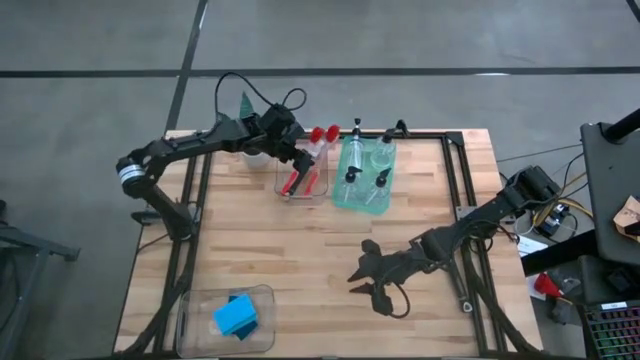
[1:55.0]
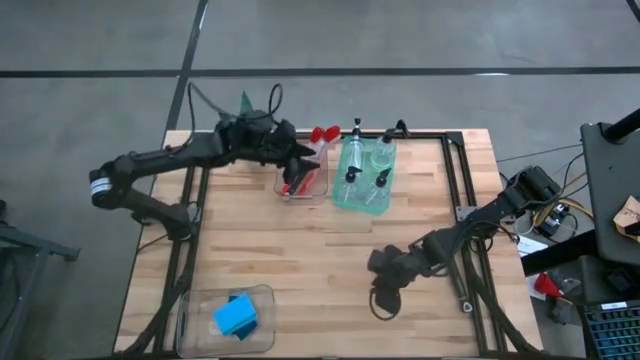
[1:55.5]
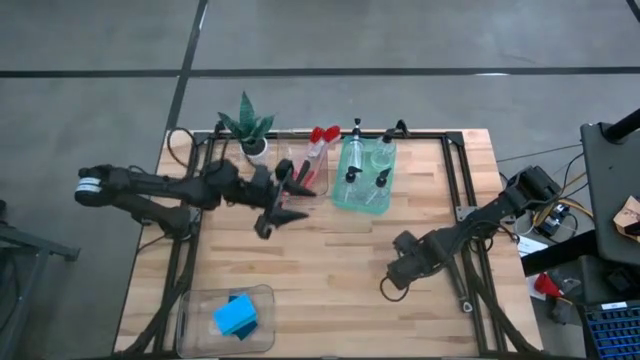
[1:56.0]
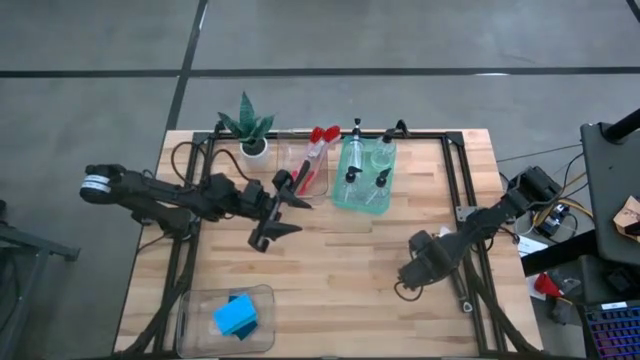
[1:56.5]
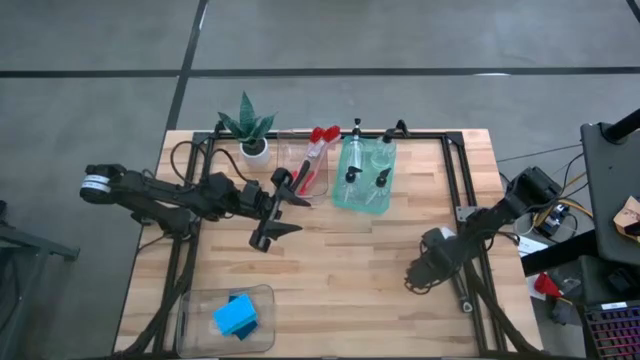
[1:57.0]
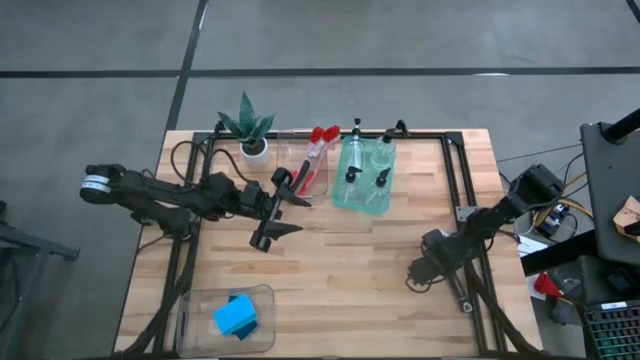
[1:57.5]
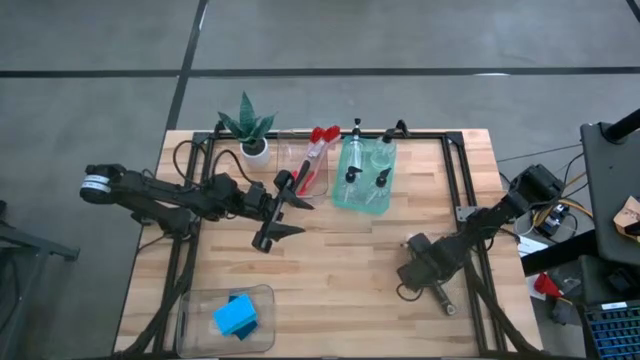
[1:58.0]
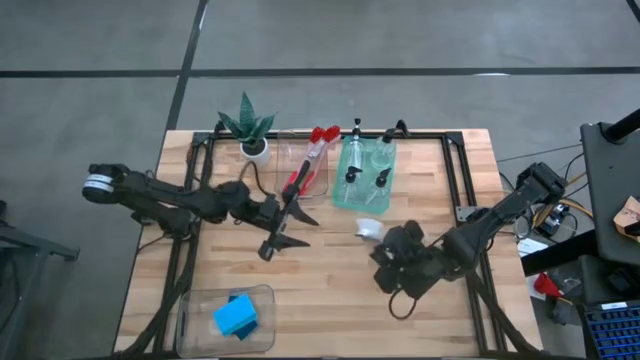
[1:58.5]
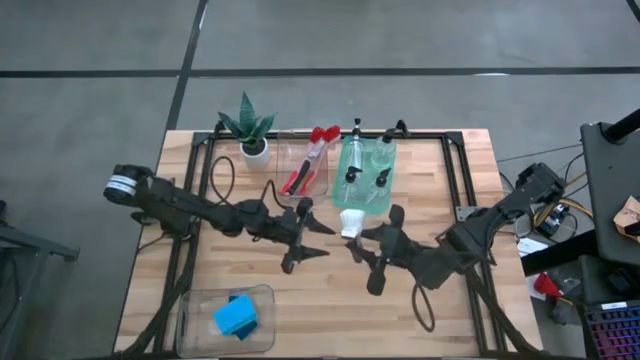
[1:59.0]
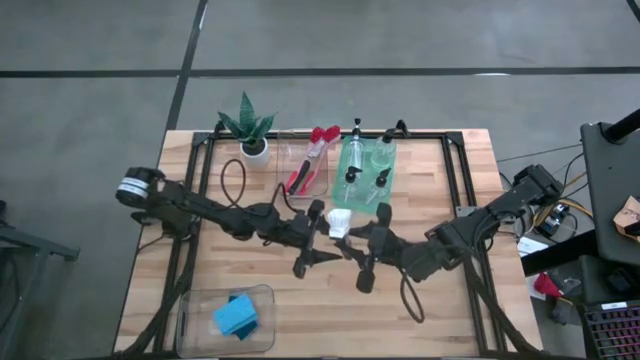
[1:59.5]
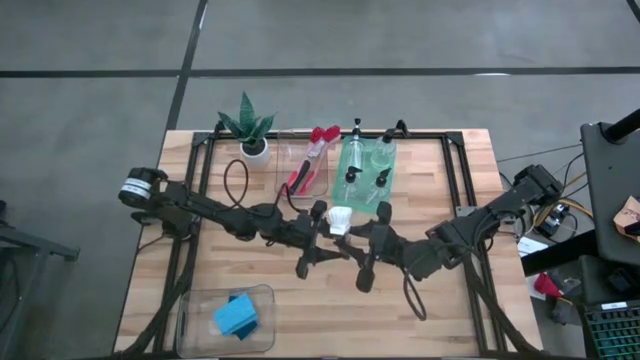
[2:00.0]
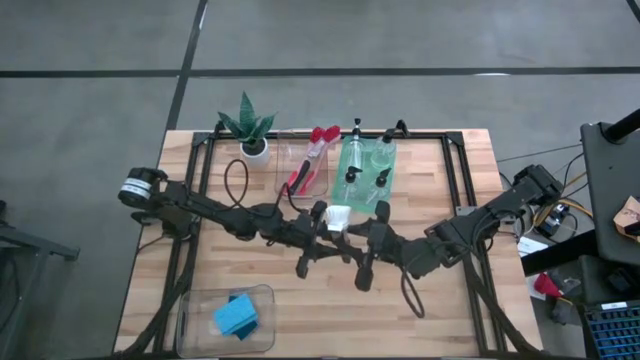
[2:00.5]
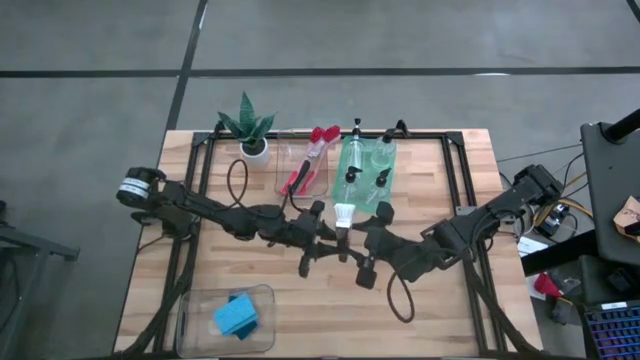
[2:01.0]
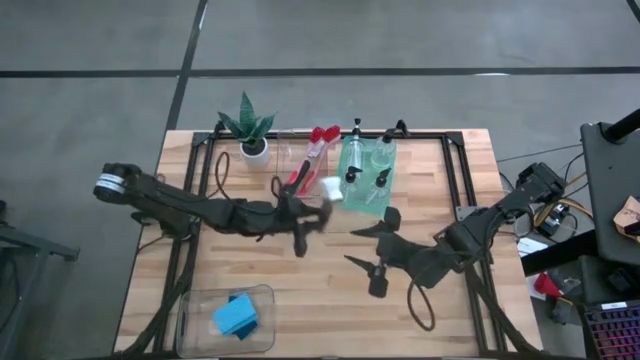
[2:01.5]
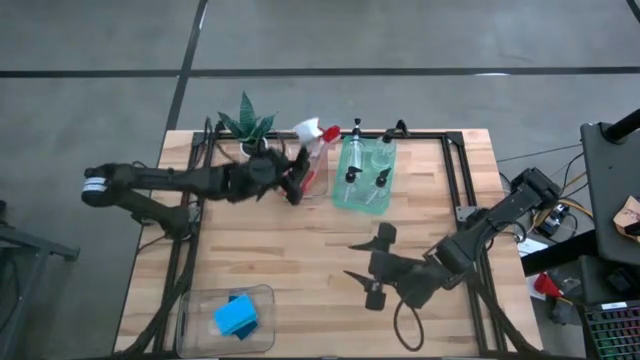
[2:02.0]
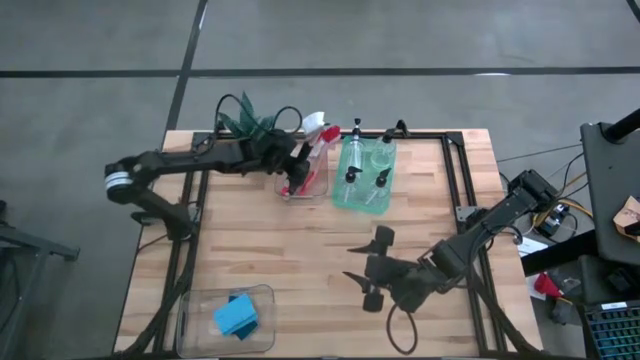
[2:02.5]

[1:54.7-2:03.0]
Task: Pick & Place Kitchen Sink Supplies
Put the black dish brush into the top transparent bin

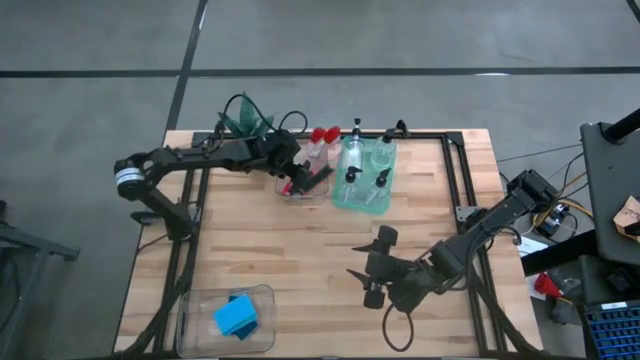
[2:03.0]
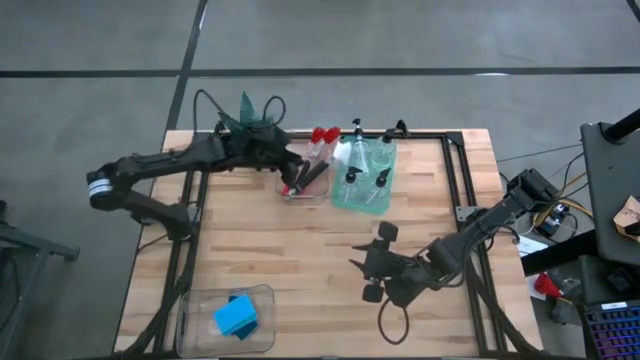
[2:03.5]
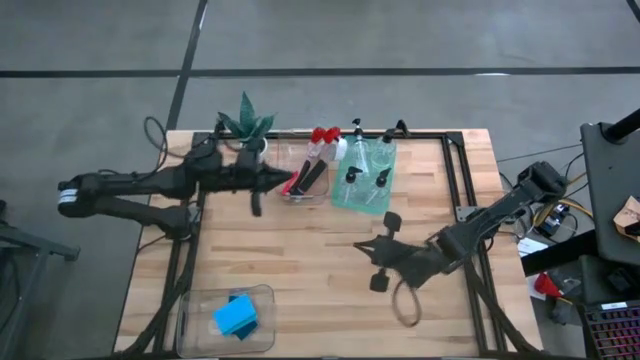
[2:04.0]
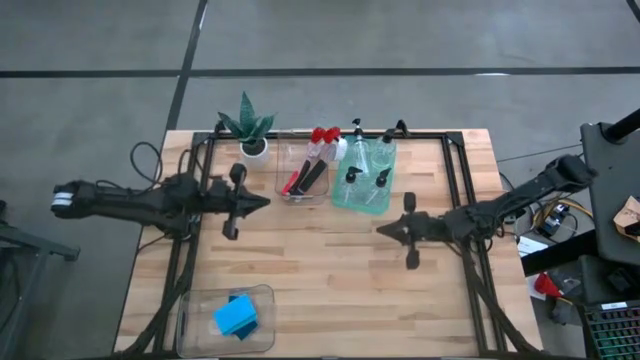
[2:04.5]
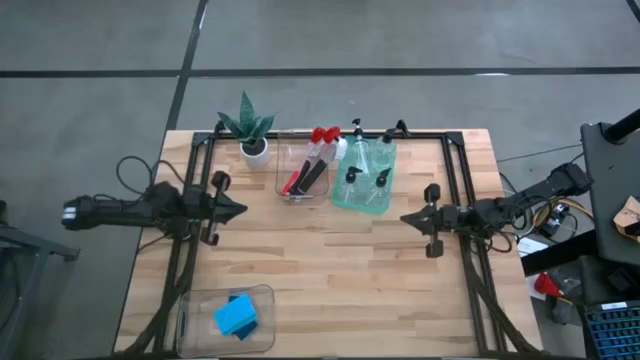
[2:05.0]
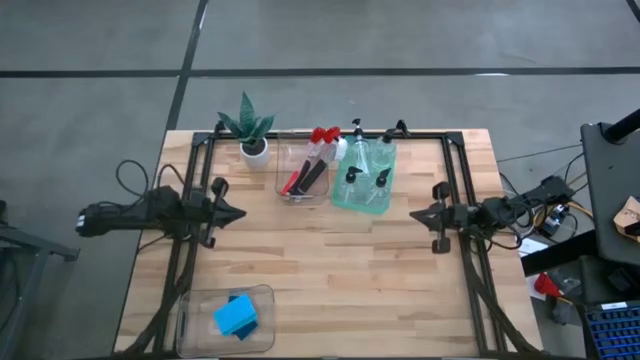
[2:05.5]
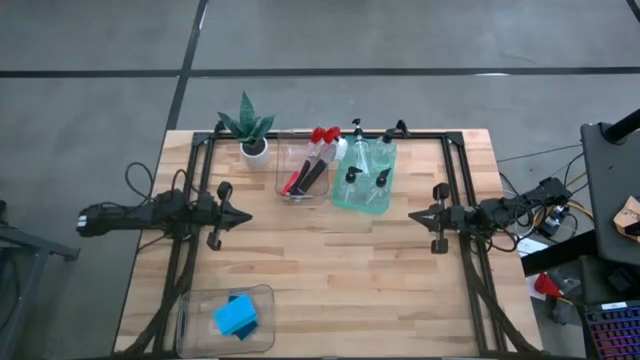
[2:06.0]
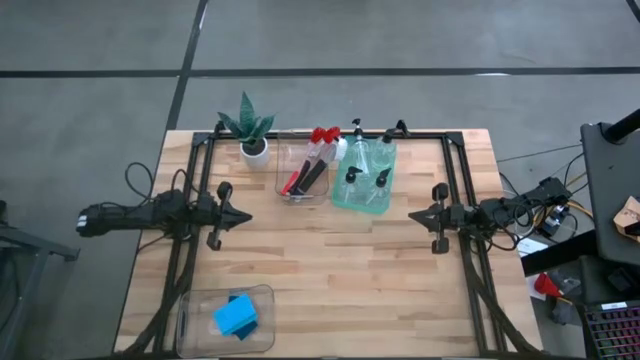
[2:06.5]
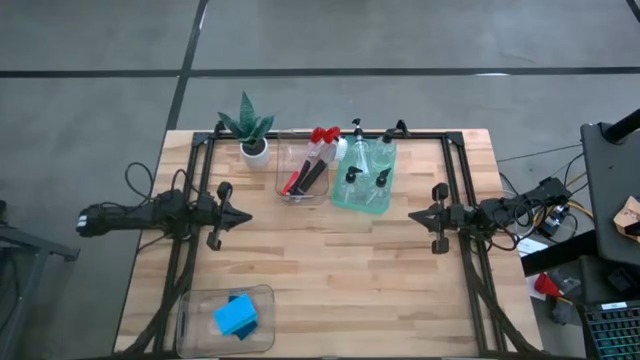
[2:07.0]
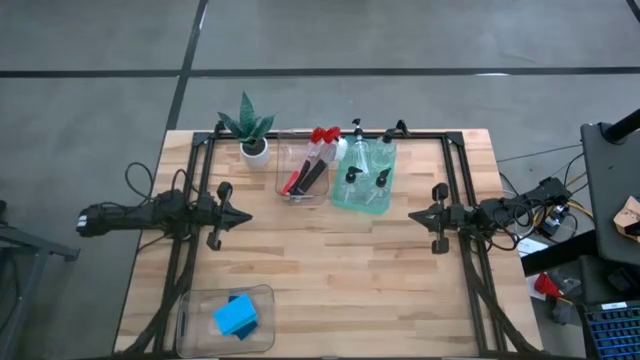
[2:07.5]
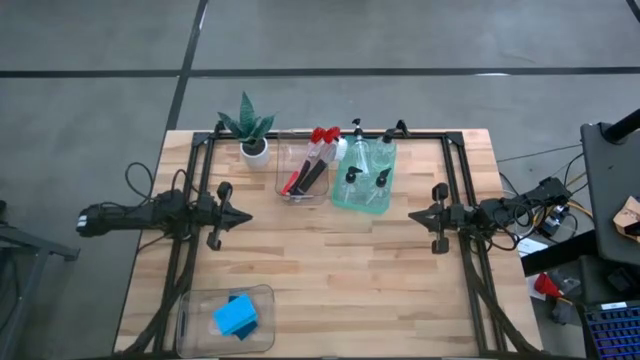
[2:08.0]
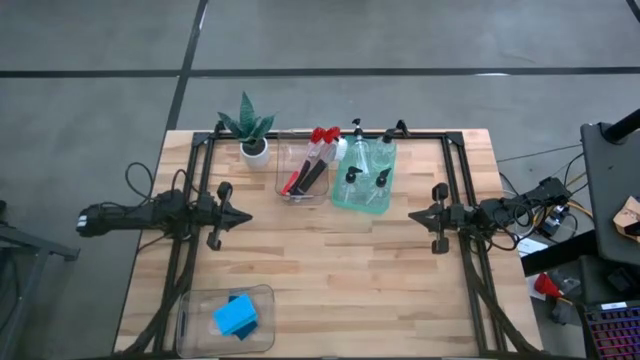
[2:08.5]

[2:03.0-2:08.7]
Return to Home Position

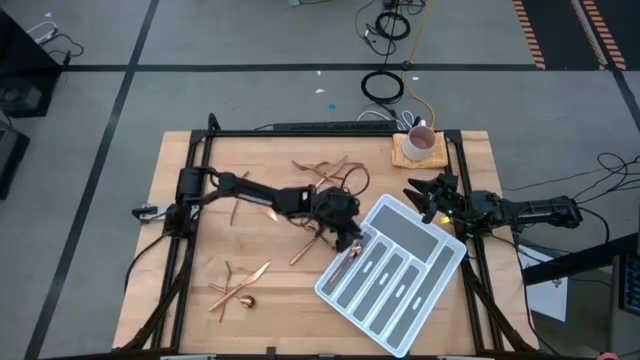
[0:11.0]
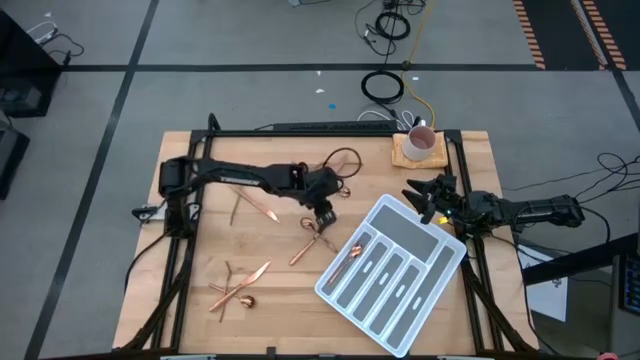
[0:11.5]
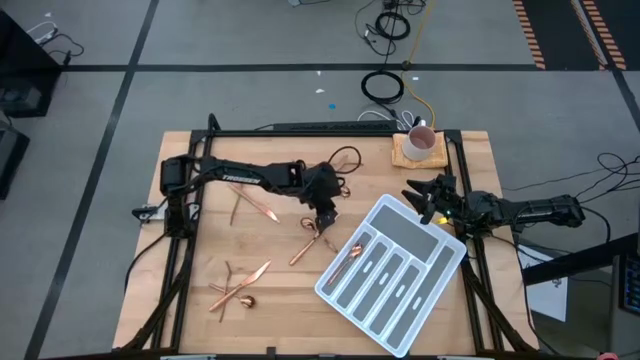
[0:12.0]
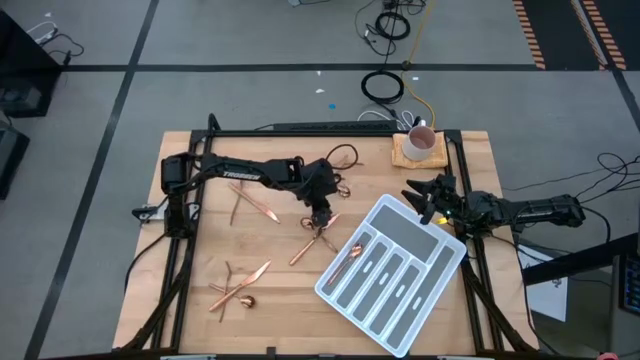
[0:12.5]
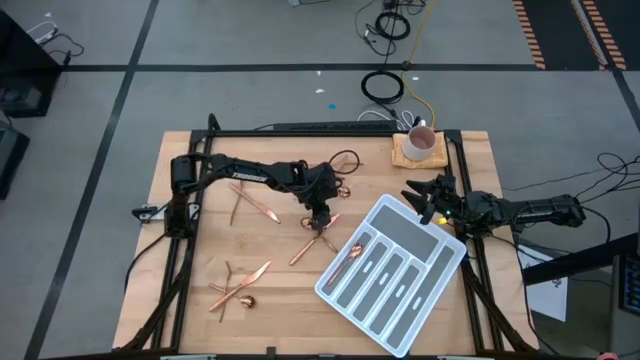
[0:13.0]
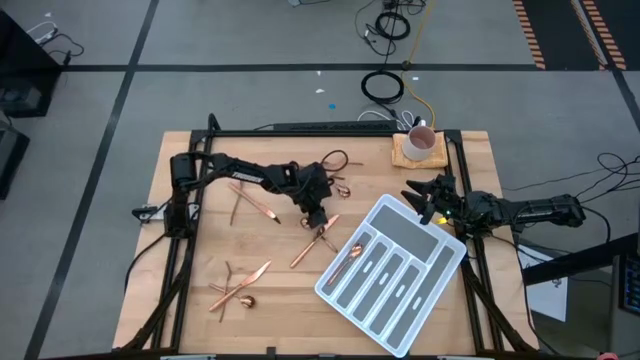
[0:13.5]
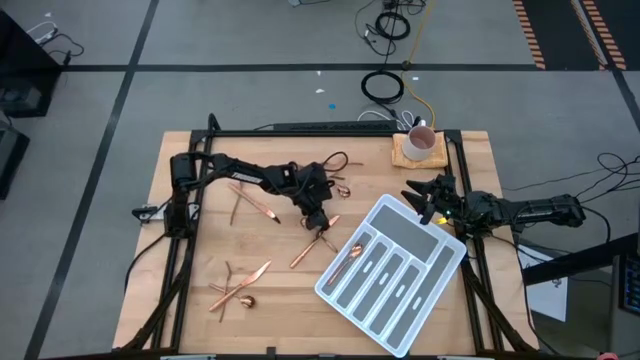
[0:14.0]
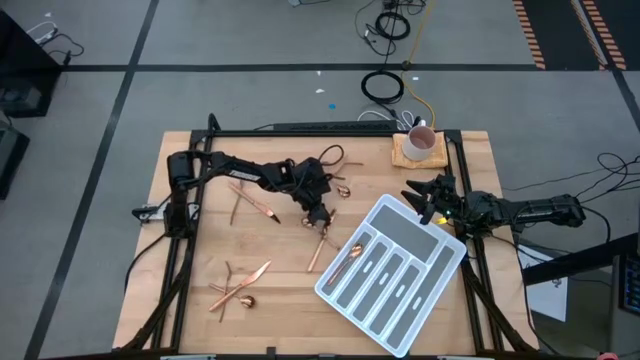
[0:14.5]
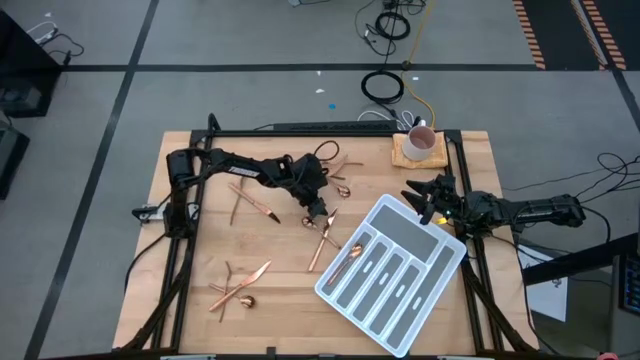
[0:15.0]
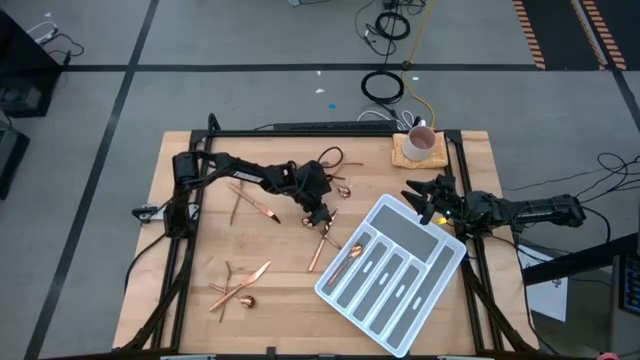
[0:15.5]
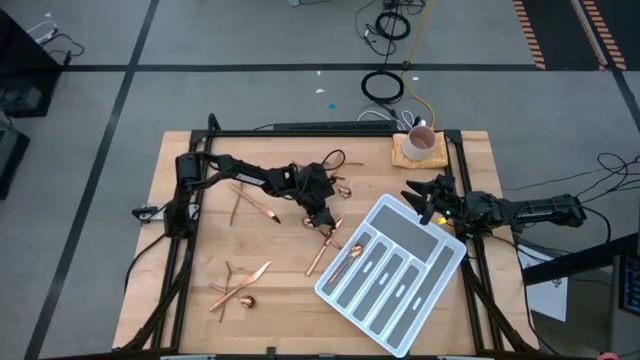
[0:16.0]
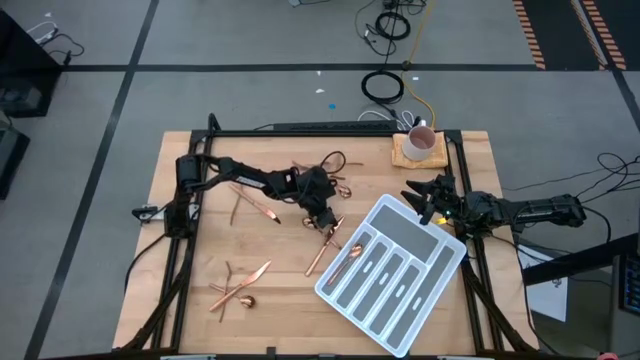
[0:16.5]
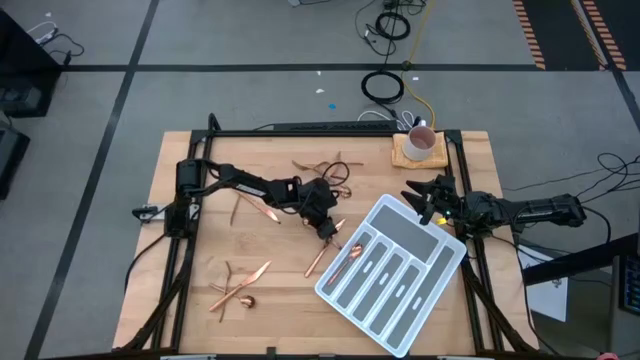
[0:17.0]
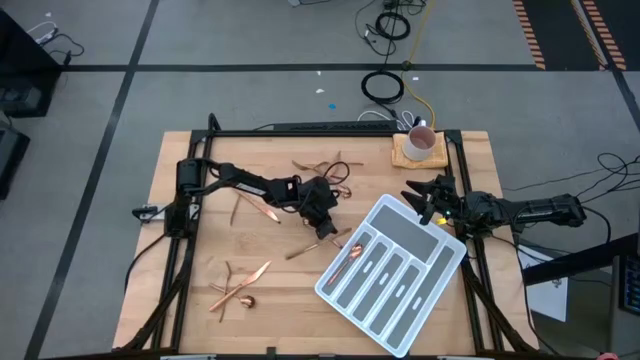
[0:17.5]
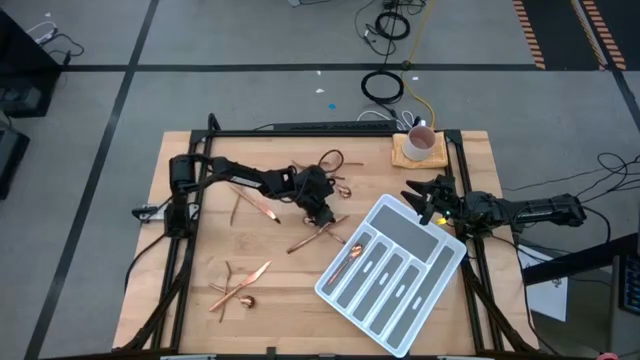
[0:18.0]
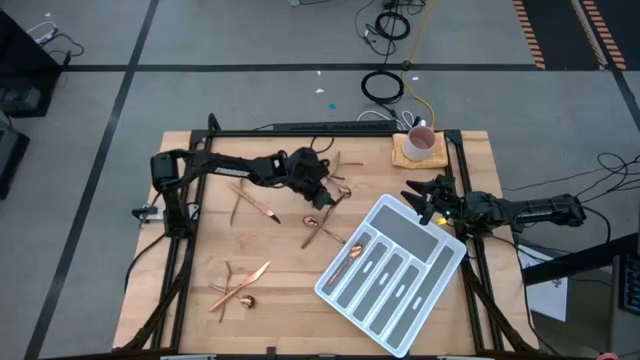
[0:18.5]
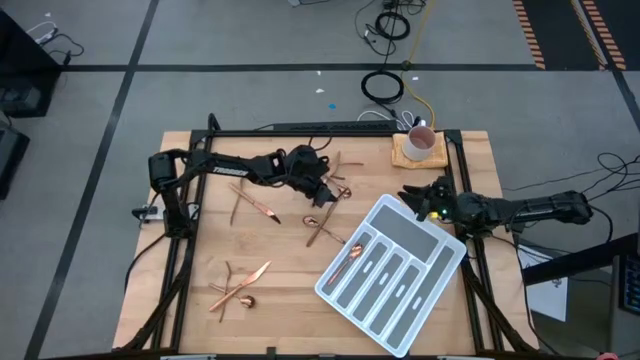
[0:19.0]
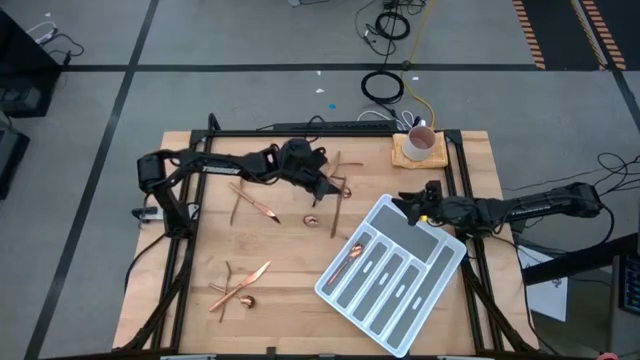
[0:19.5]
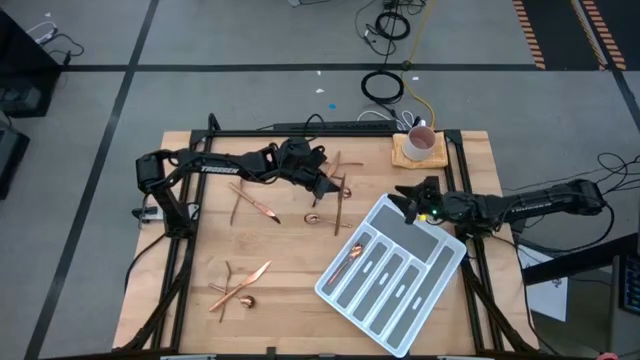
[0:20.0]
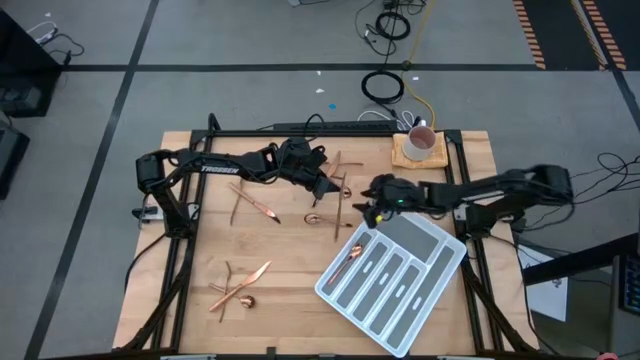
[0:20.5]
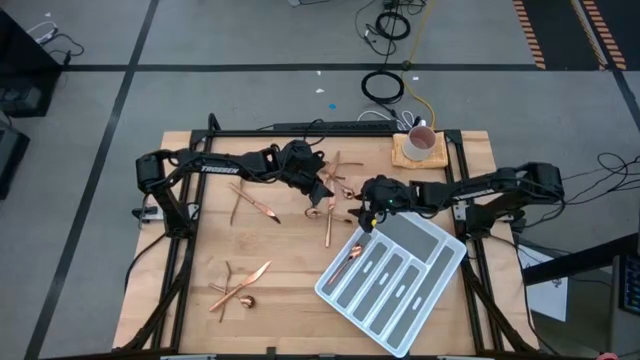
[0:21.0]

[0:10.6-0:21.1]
Task: Sort silverware
Put the gold table knife into the cutlery tray
